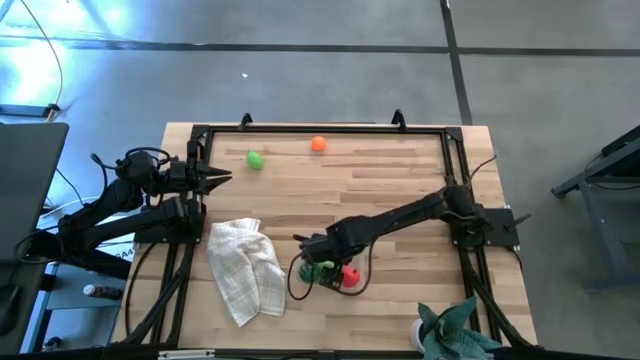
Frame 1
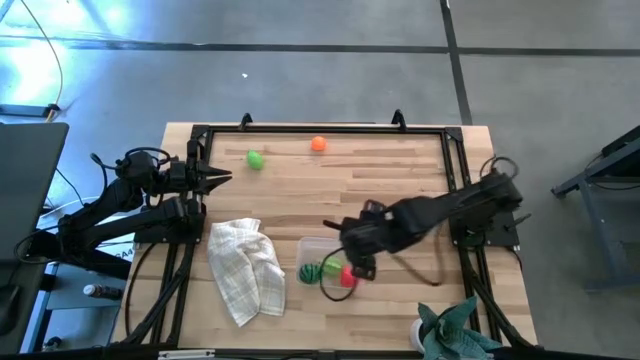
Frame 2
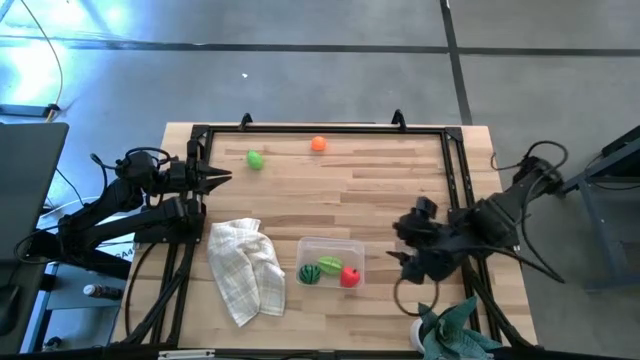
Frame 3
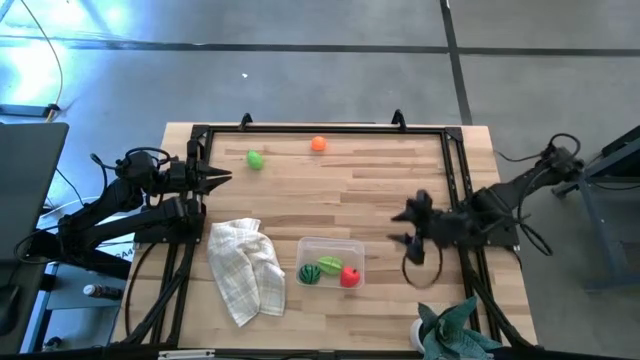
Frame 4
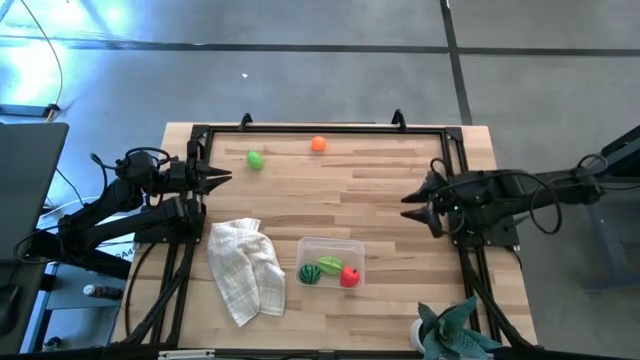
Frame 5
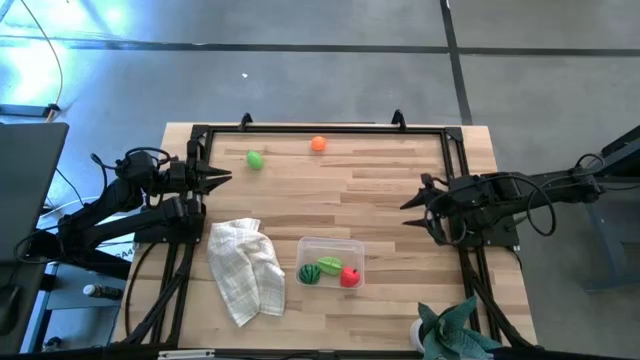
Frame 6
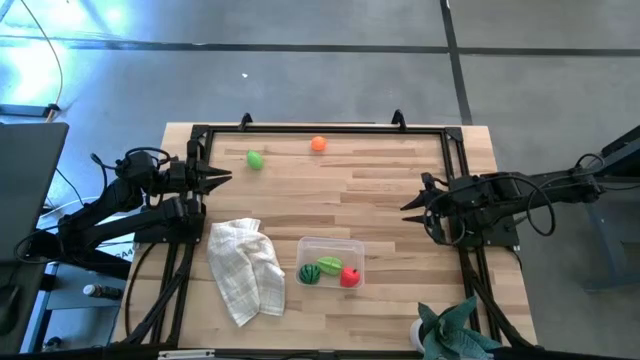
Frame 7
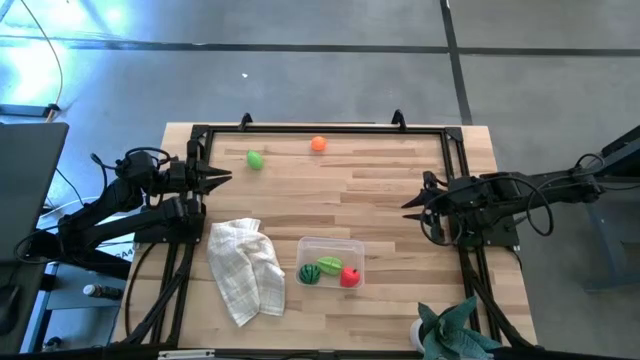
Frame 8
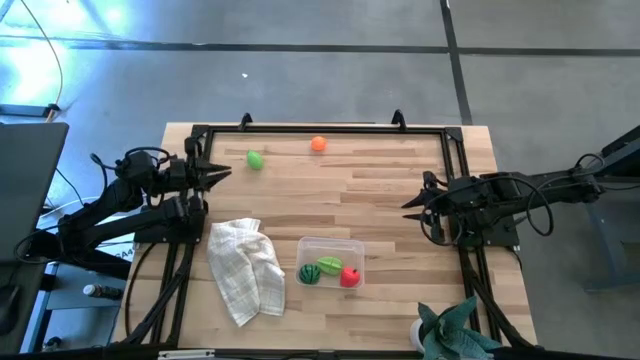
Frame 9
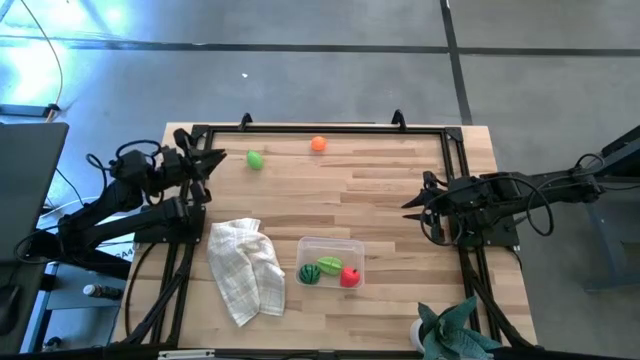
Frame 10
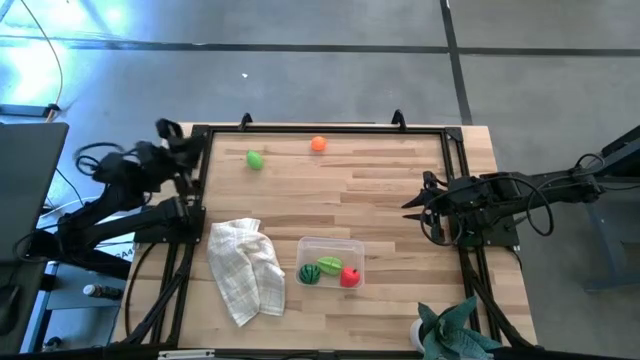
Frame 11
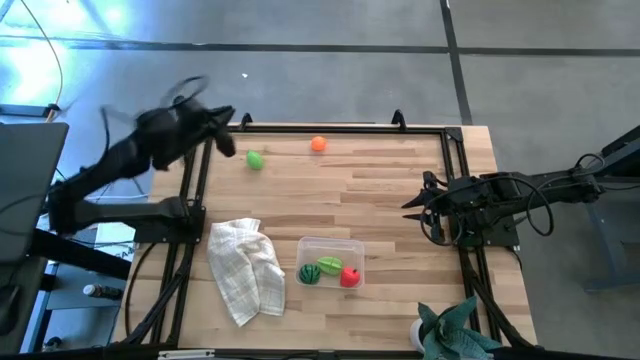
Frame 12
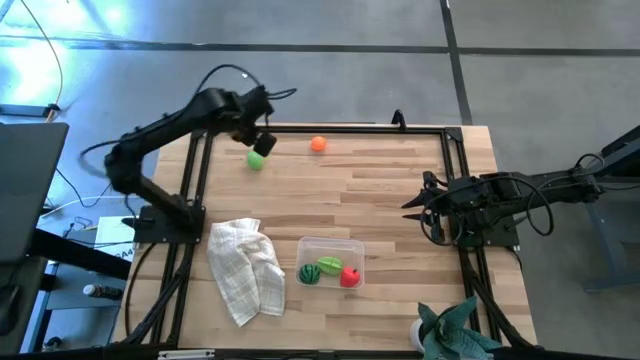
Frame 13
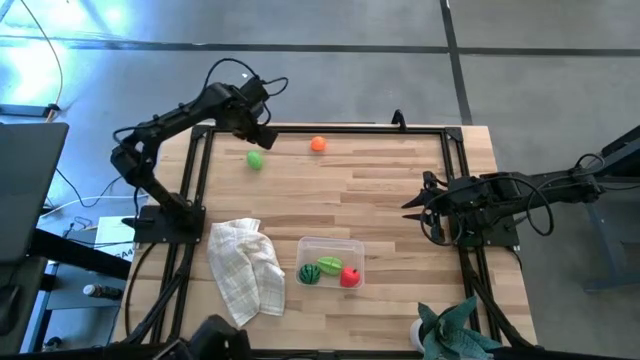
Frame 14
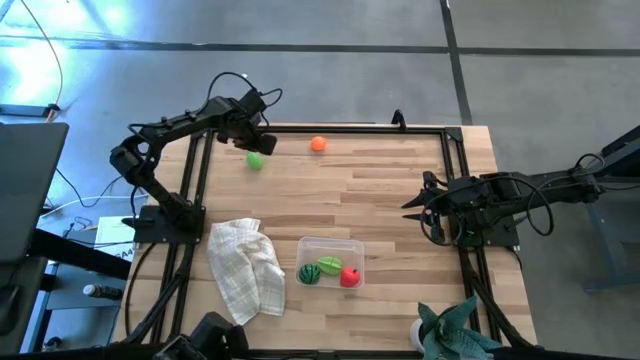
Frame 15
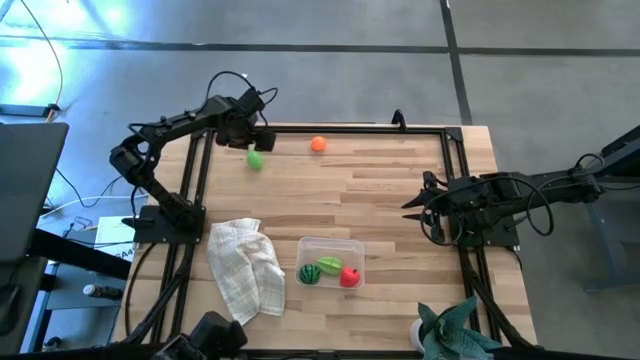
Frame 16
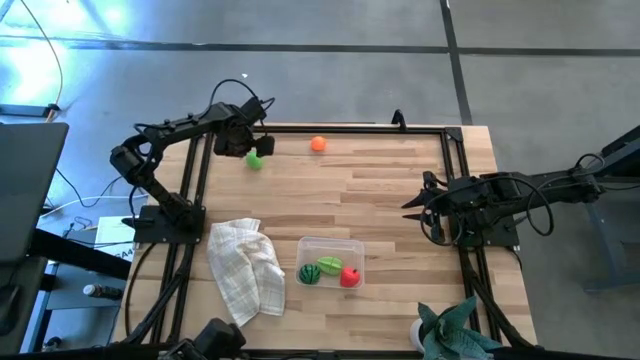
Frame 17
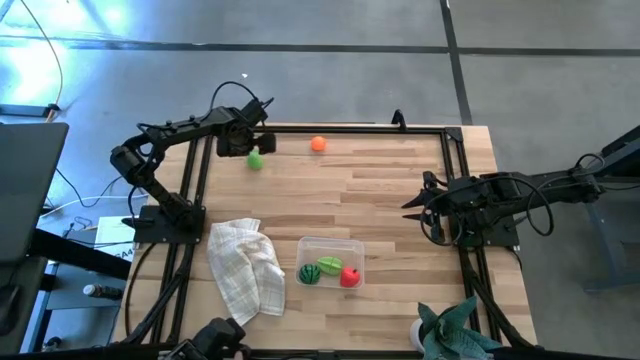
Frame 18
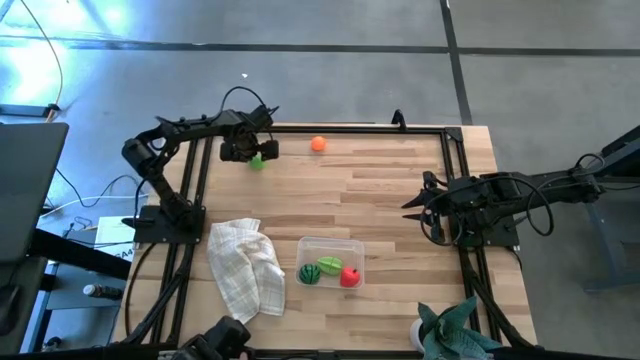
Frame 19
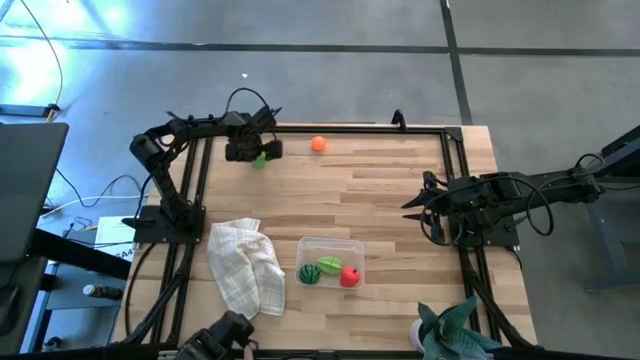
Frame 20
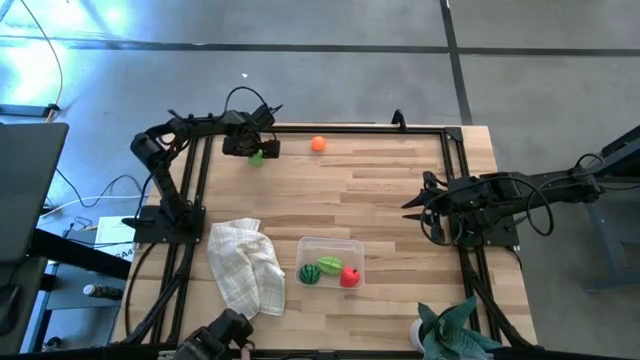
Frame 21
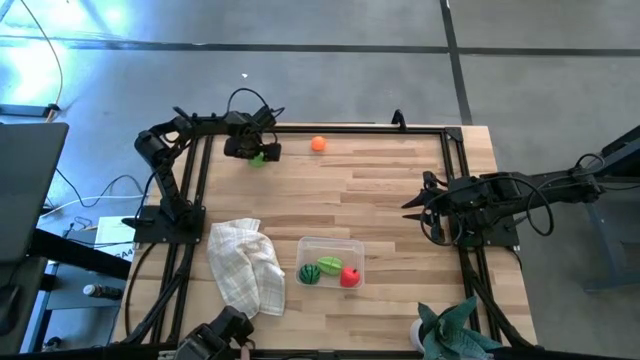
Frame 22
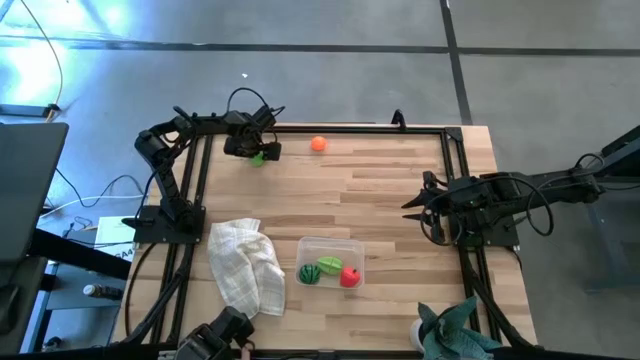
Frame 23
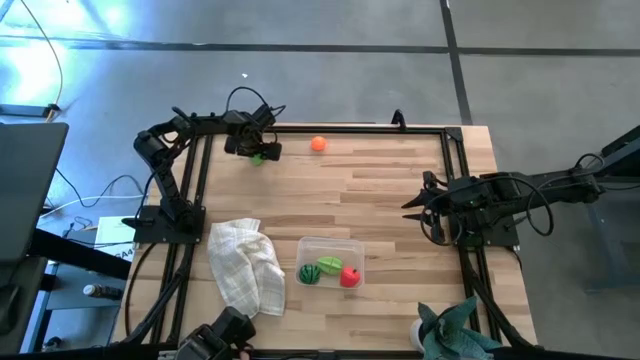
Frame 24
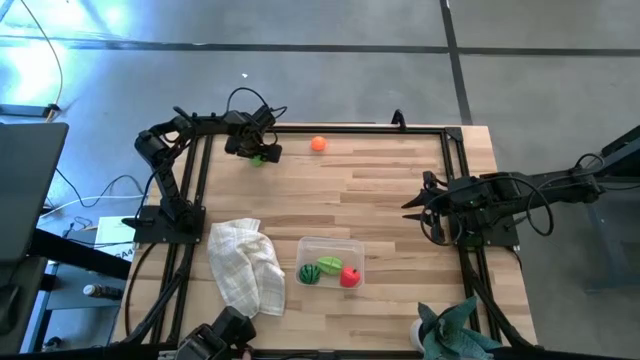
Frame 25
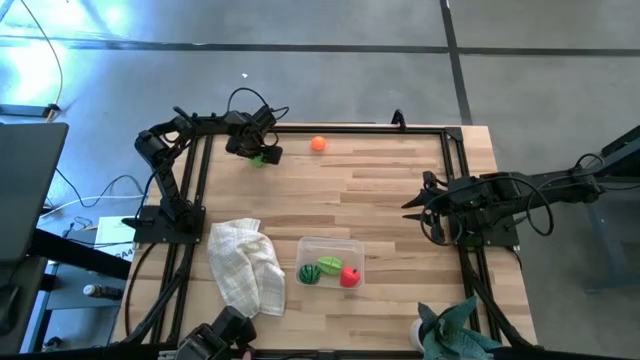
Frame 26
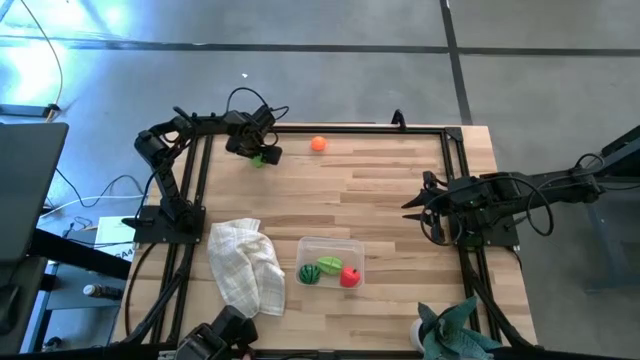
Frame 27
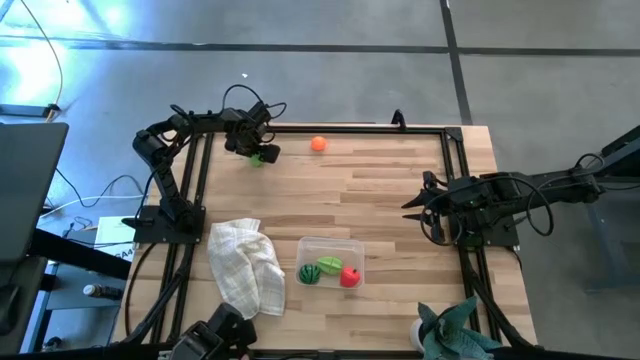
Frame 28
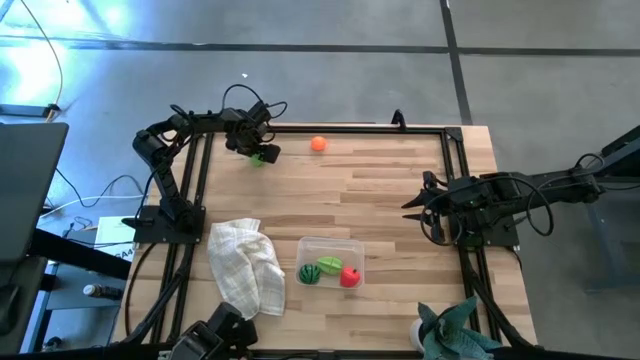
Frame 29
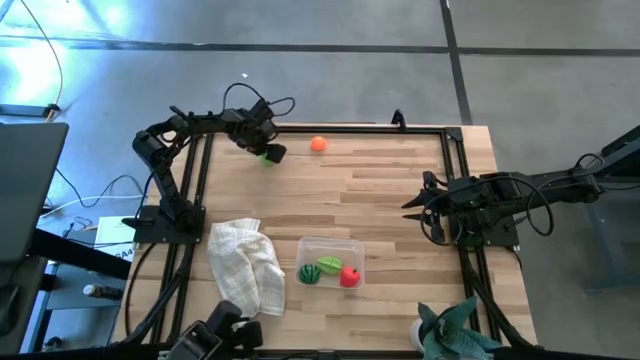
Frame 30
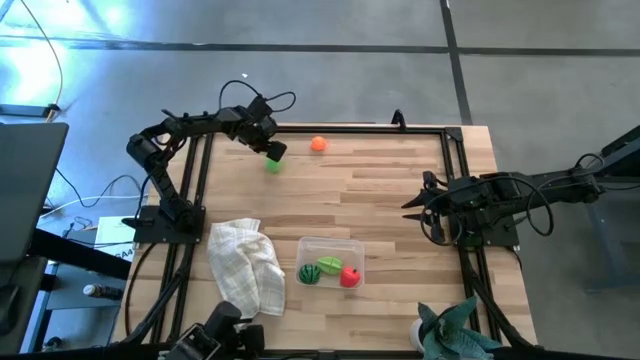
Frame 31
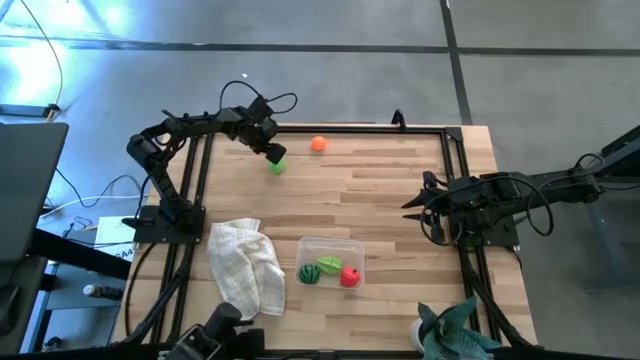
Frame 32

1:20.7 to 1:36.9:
Task: Pick and placing Produce into tupperware
Put the green melon into the transparent bin
